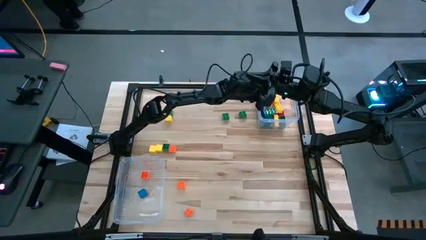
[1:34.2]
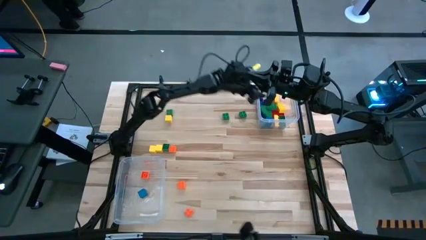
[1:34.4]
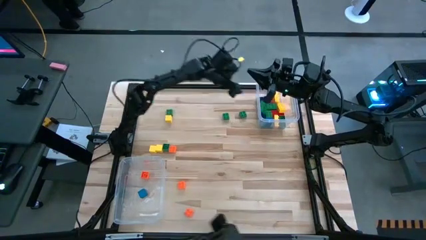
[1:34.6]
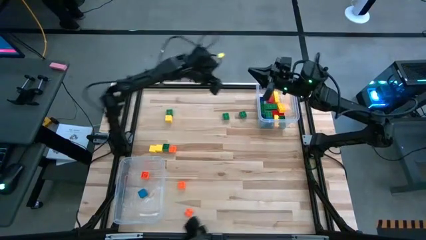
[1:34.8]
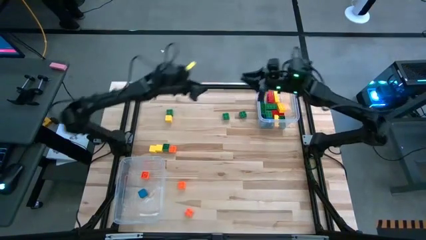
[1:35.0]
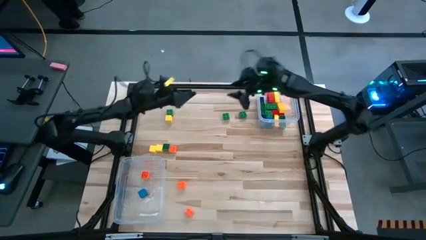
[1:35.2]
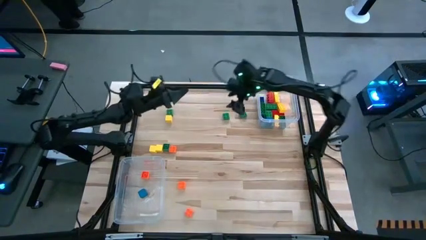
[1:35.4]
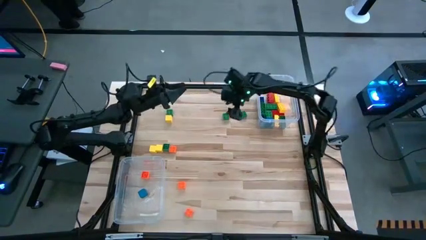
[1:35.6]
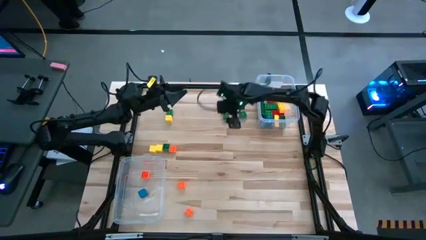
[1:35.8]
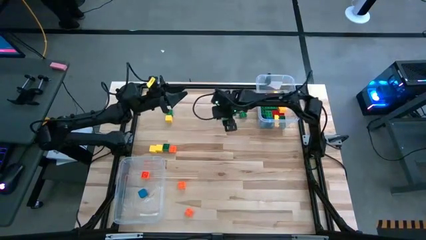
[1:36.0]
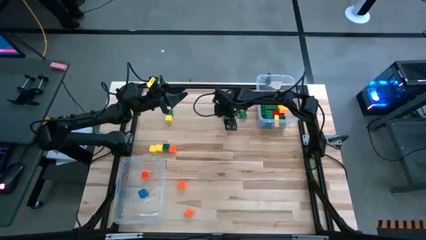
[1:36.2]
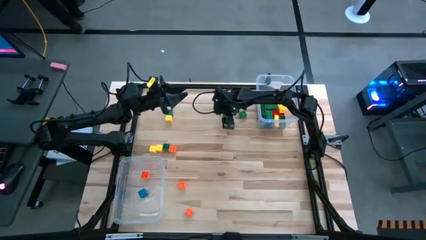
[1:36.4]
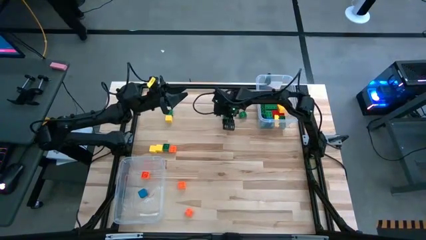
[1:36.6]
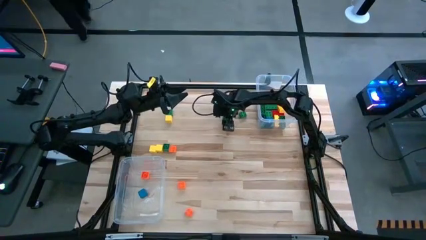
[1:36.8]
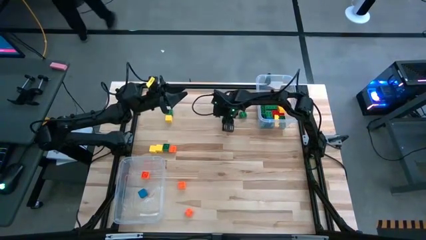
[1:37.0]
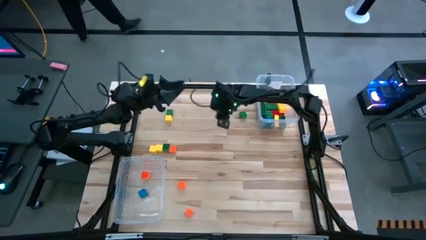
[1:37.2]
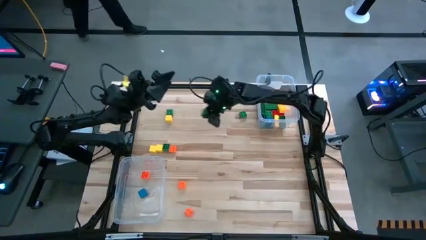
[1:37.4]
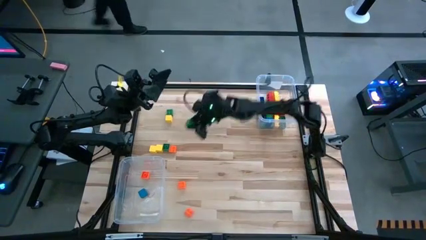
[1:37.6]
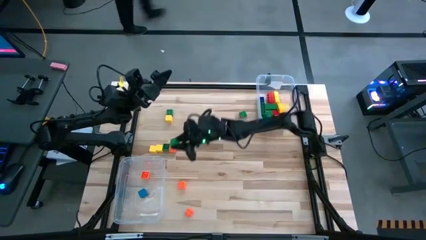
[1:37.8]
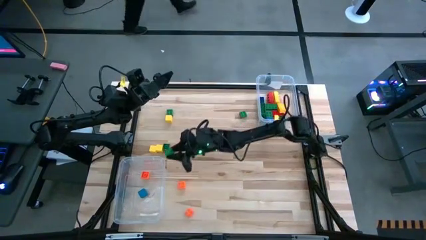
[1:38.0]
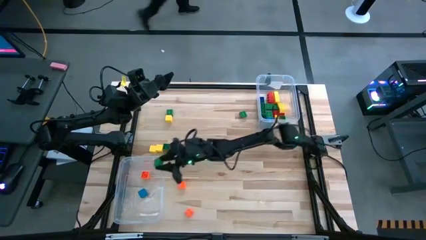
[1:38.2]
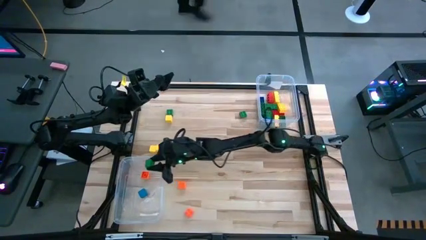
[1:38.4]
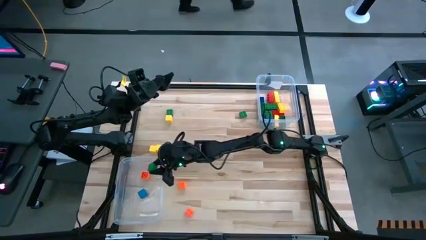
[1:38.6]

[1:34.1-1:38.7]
Task: Sort blocks by size
Put the middle small green game piece into the left transparent bin

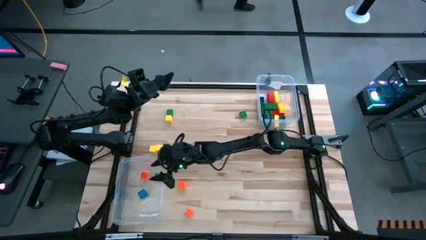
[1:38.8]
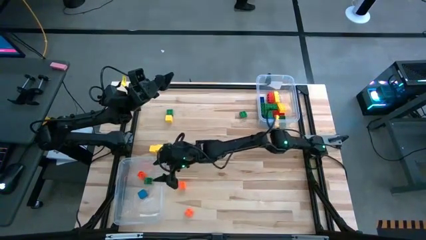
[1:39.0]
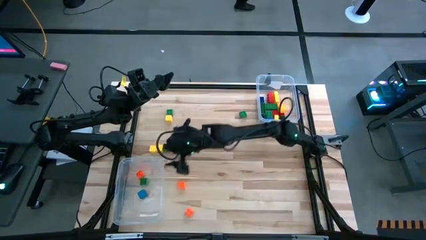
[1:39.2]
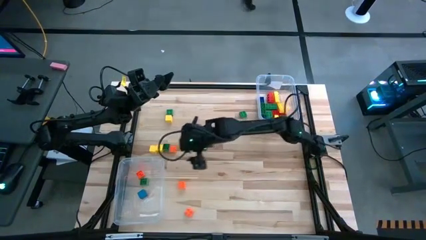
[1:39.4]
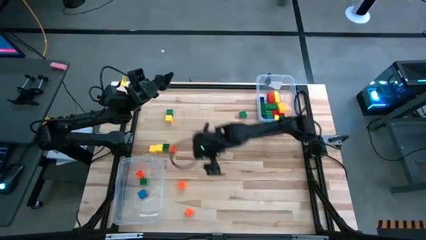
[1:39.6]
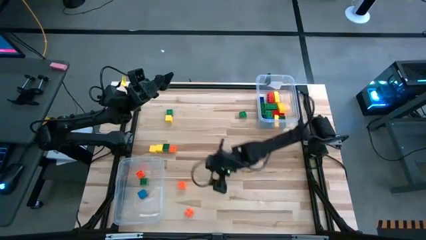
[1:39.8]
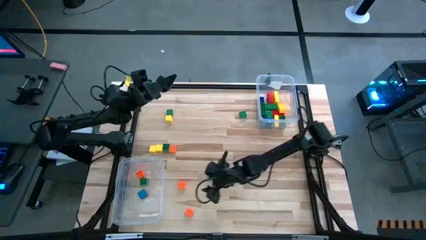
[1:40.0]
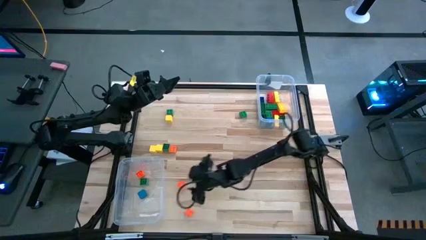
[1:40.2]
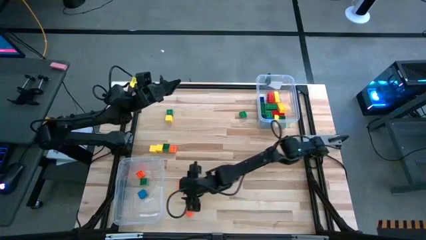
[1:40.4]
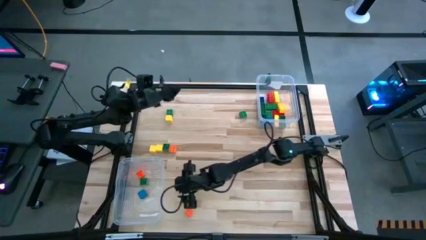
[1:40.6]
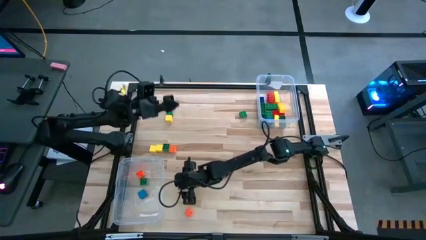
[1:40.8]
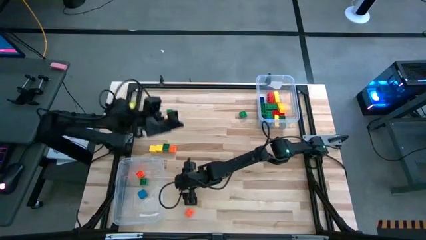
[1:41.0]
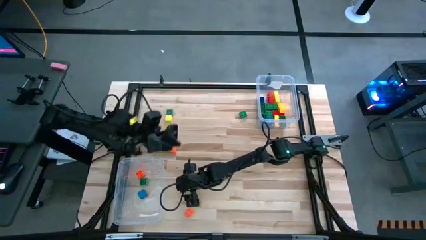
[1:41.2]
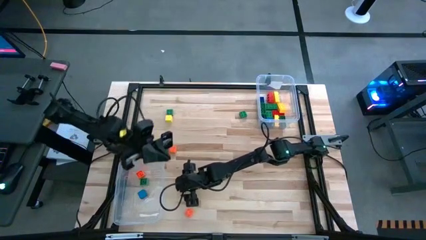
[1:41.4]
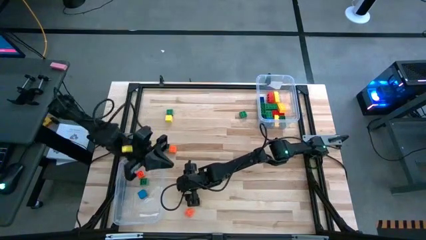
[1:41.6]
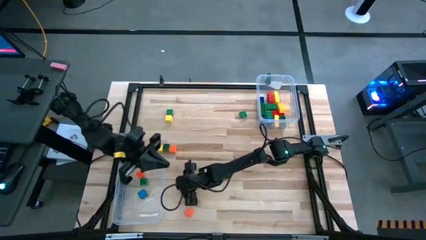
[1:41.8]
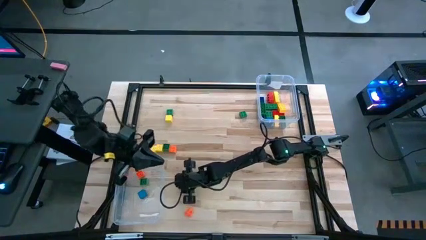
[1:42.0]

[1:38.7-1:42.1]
Put the middle small orange game piece into the left transparent bin

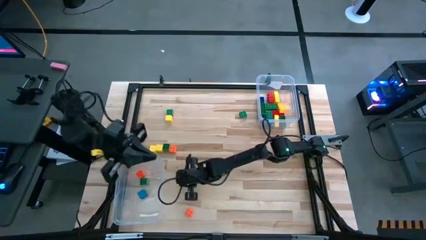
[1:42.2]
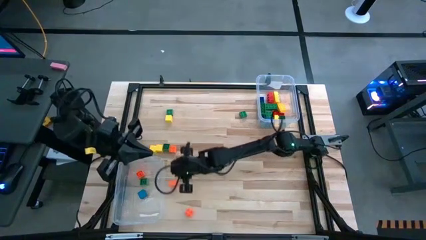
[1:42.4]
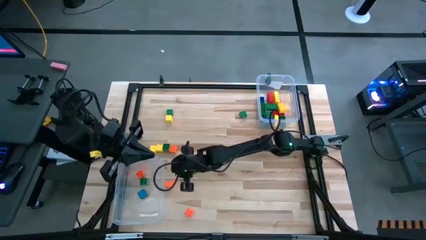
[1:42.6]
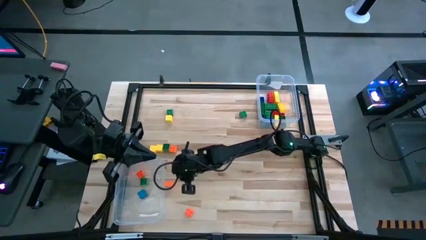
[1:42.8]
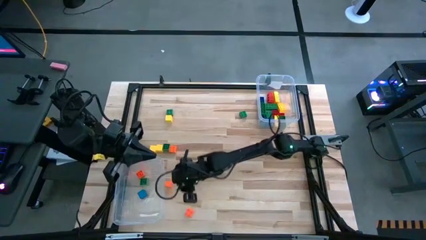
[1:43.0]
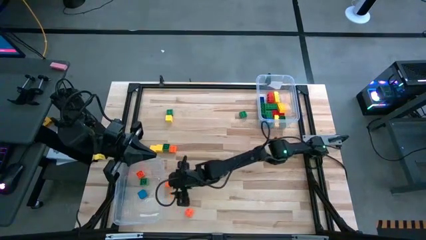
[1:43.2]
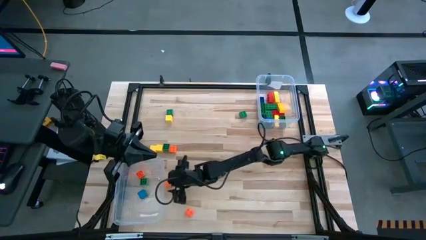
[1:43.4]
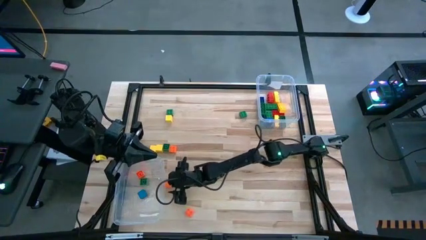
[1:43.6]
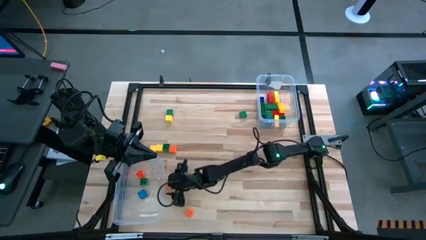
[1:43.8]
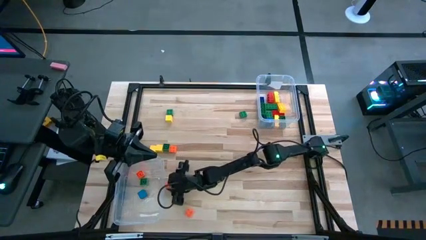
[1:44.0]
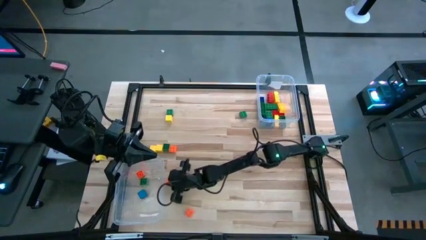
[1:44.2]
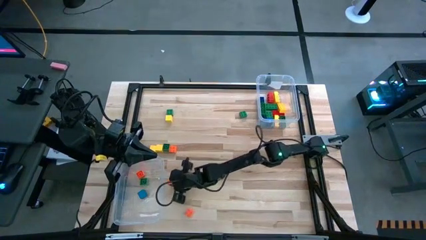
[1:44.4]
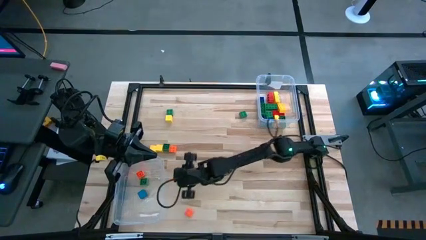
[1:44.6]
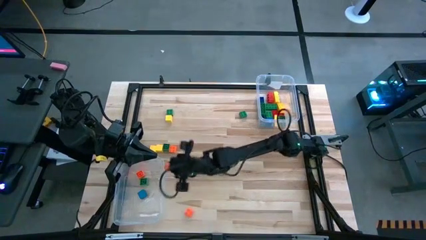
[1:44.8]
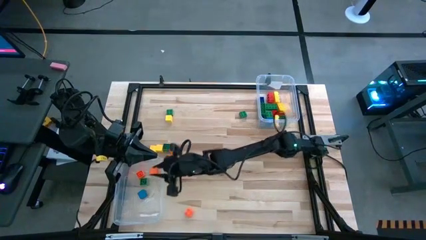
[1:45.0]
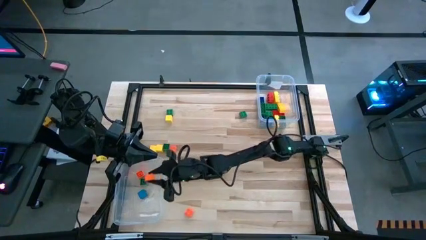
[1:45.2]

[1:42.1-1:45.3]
Put the middle small orange game piece into the left transparent bin

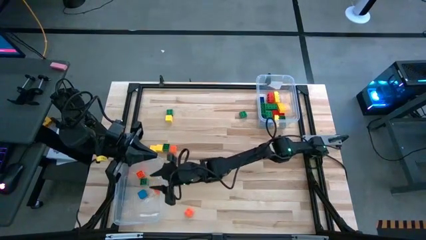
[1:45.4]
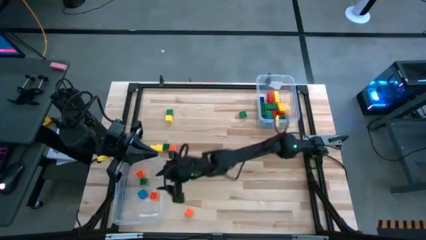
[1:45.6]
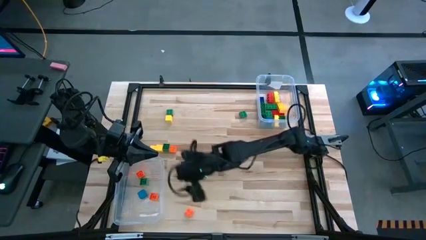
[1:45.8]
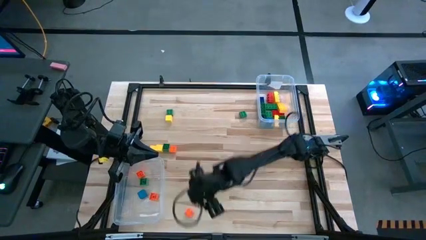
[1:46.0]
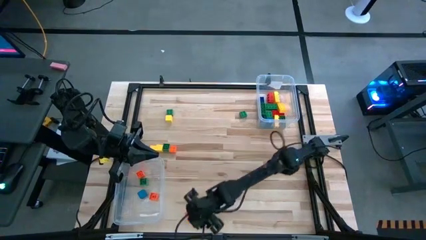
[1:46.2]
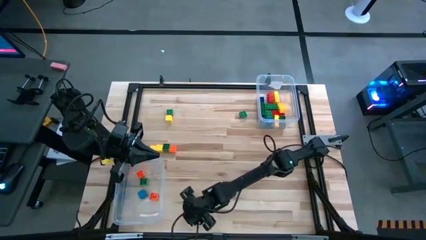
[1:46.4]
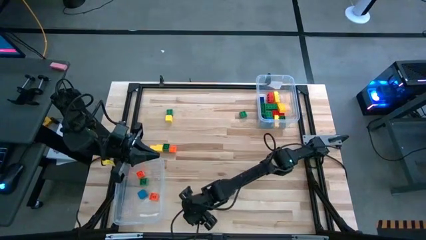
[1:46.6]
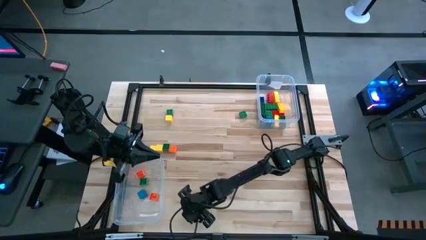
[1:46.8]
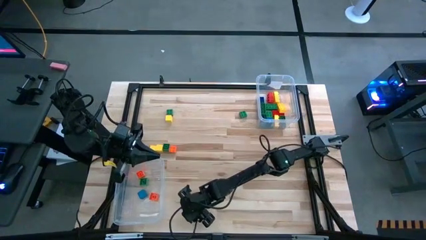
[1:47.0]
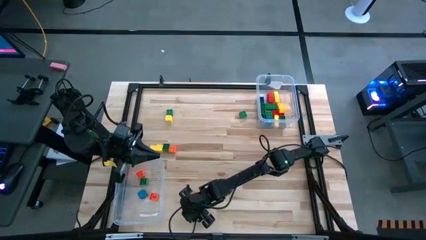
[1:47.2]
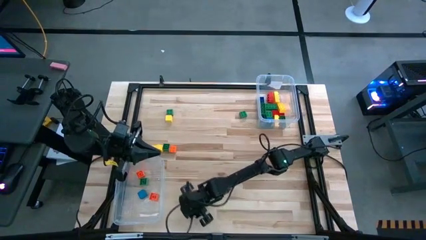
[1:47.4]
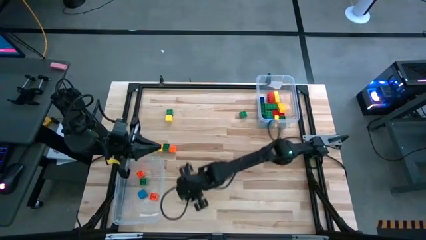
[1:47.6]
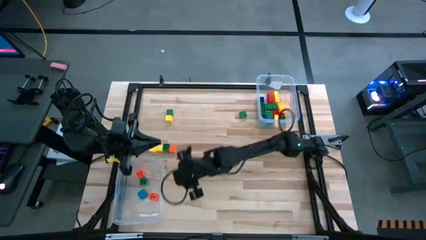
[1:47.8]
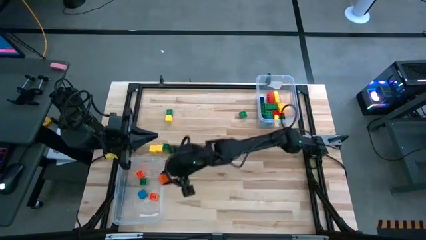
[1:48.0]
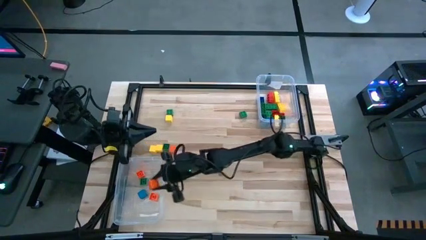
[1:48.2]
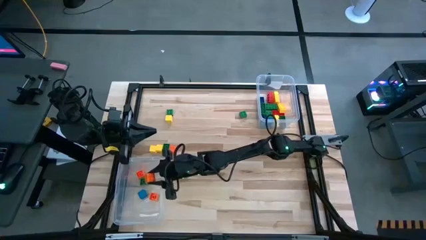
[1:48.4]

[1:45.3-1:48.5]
Put the bottom small orange game piece into the left transparent bin

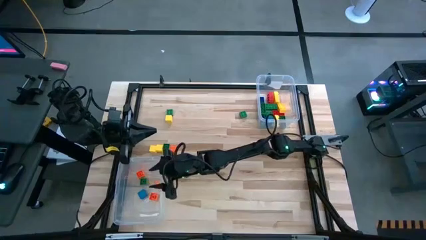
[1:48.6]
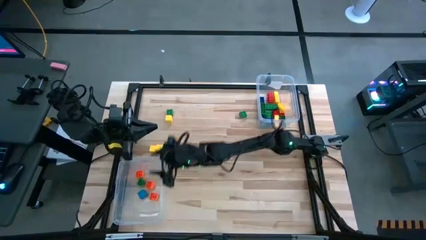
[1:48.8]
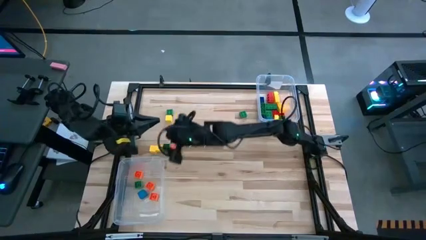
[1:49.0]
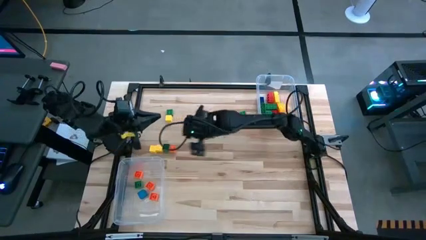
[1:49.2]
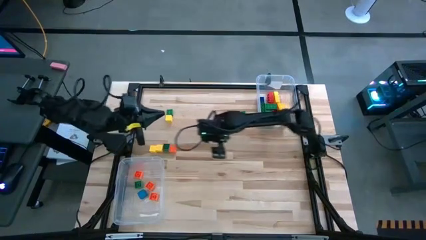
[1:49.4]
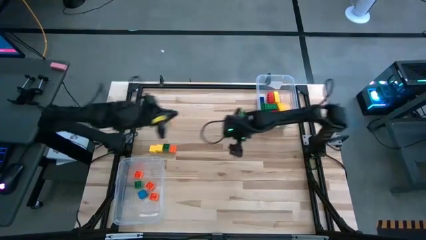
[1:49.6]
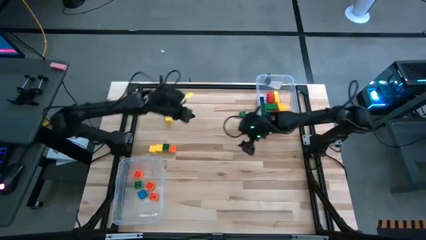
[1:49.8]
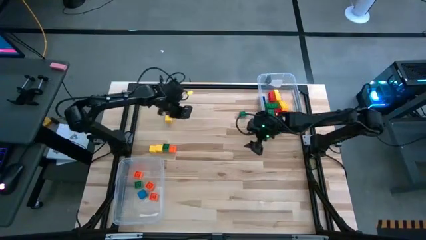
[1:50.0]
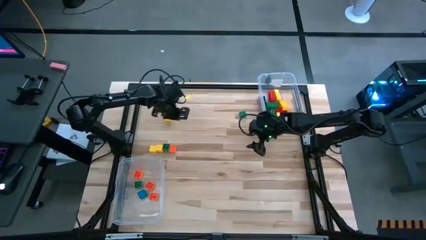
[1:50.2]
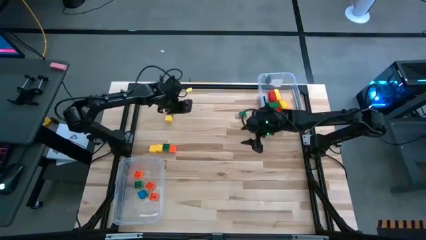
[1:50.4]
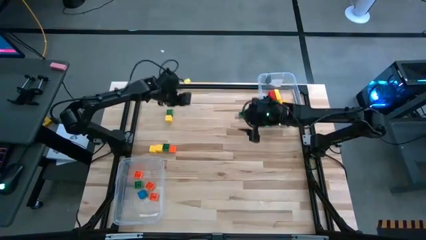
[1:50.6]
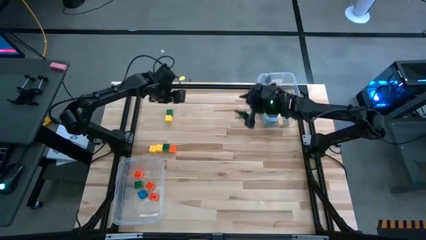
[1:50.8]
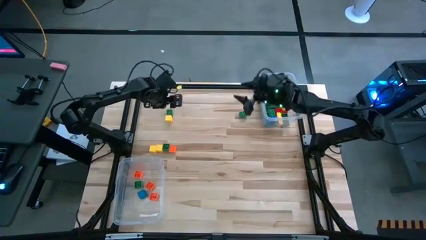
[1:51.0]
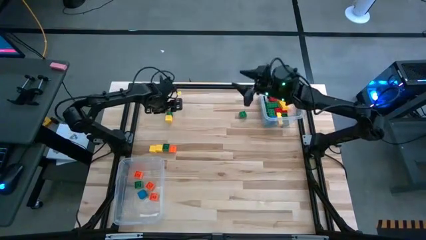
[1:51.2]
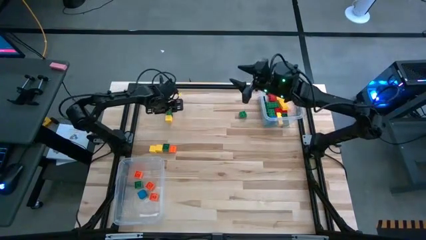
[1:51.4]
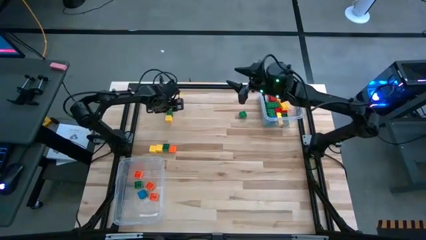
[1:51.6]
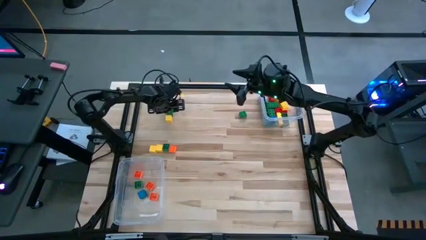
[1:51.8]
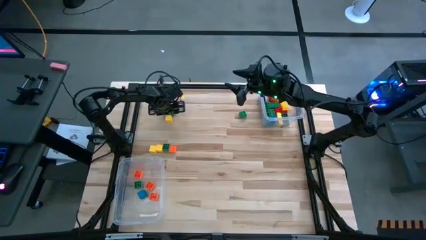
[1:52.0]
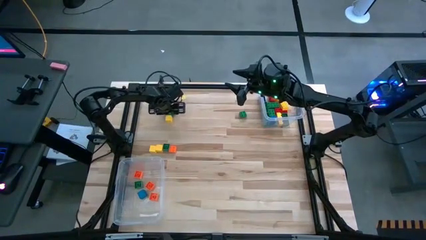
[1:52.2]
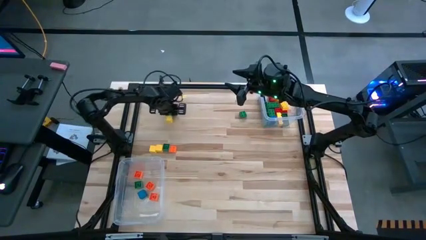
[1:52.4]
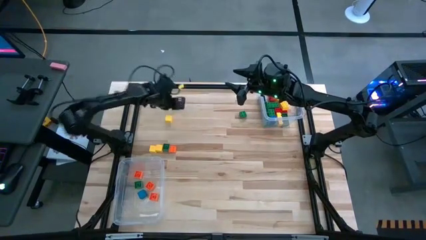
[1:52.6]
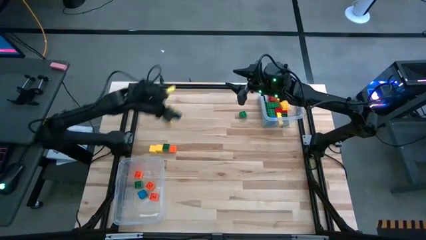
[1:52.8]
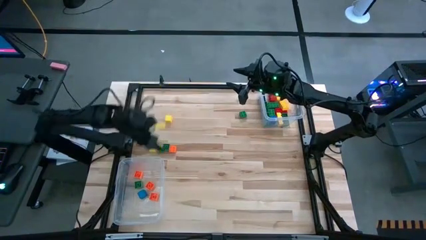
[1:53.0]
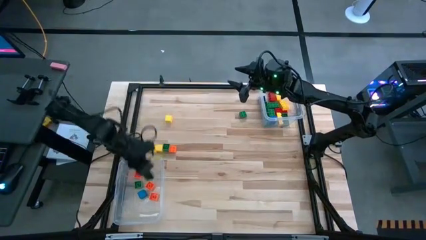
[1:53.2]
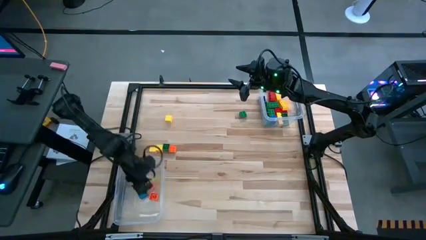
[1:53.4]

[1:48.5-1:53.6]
Put the top left small green game piece into the left transparent bin
